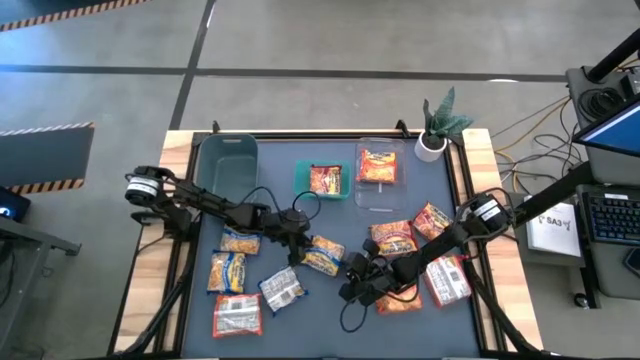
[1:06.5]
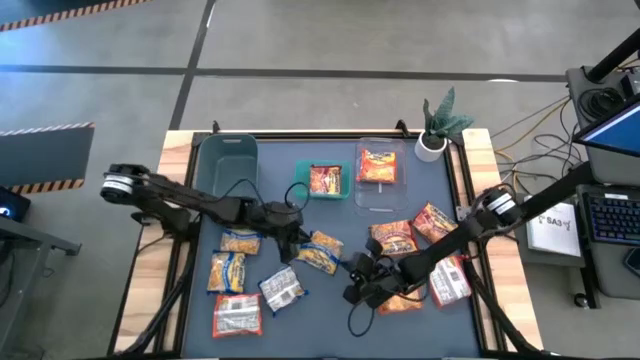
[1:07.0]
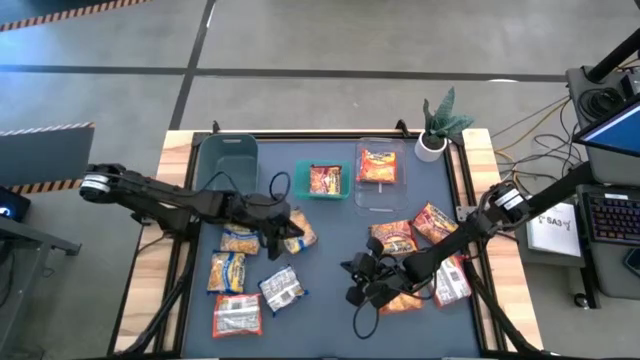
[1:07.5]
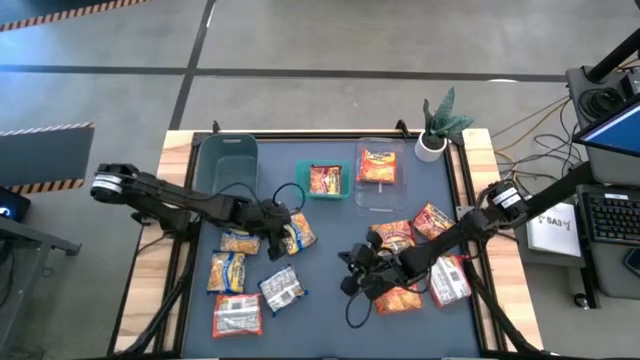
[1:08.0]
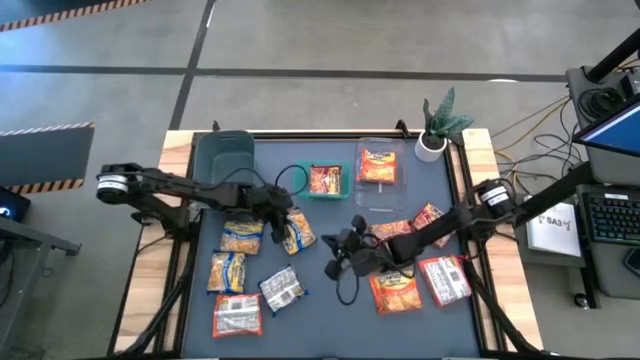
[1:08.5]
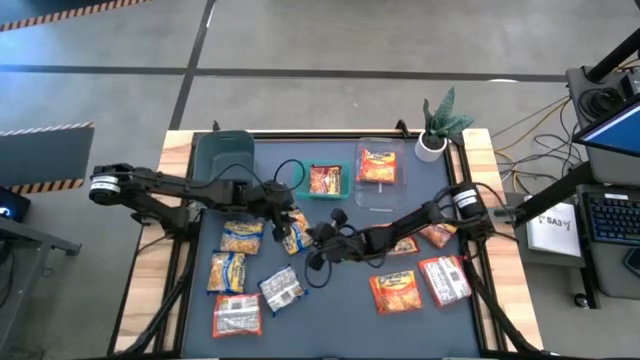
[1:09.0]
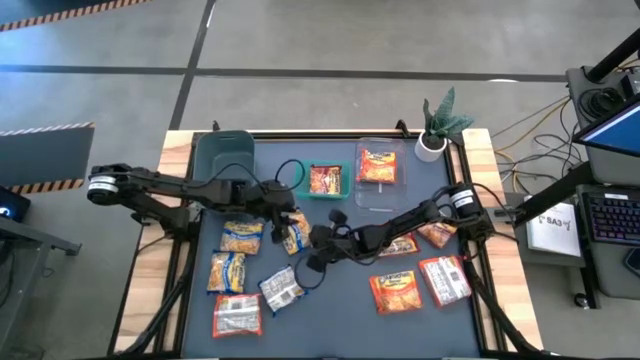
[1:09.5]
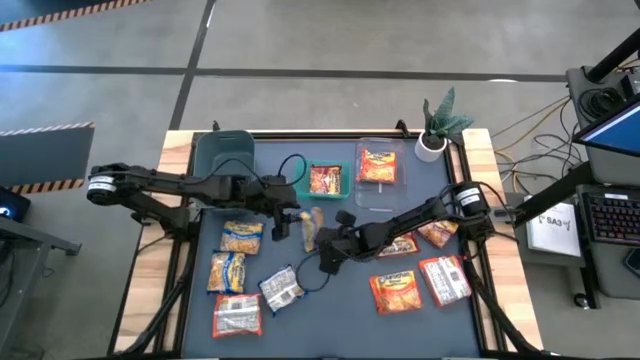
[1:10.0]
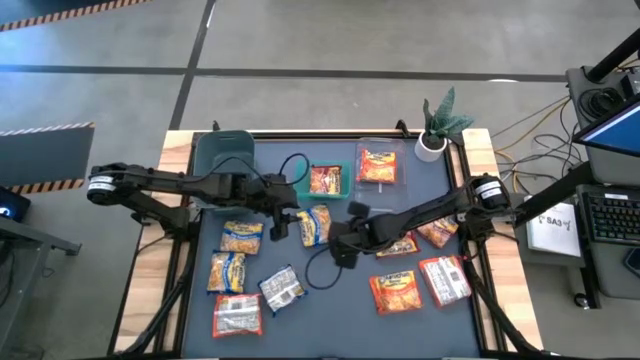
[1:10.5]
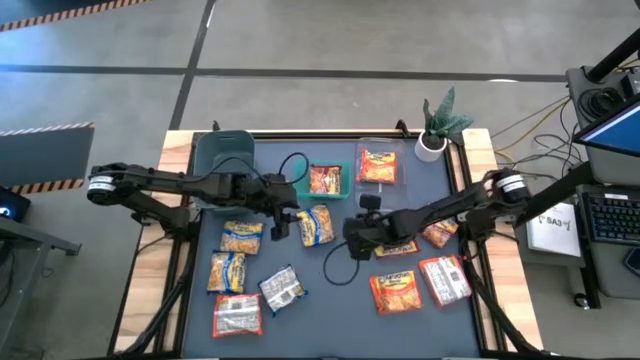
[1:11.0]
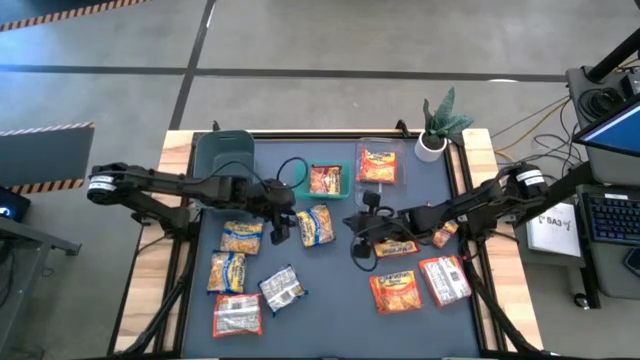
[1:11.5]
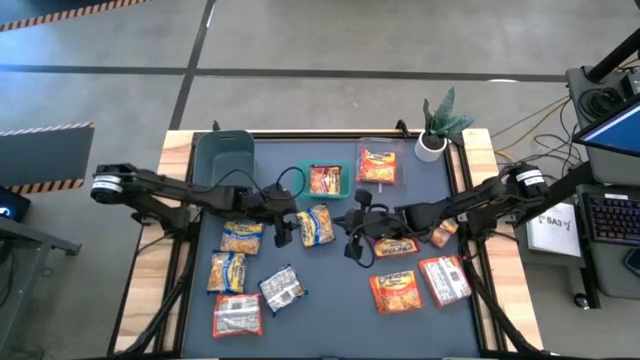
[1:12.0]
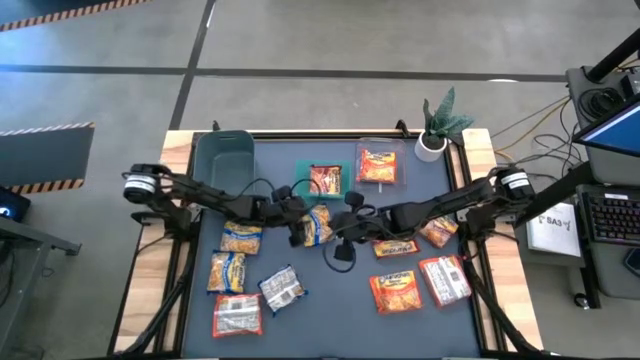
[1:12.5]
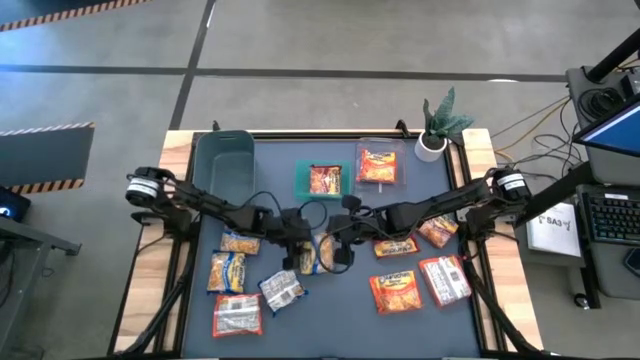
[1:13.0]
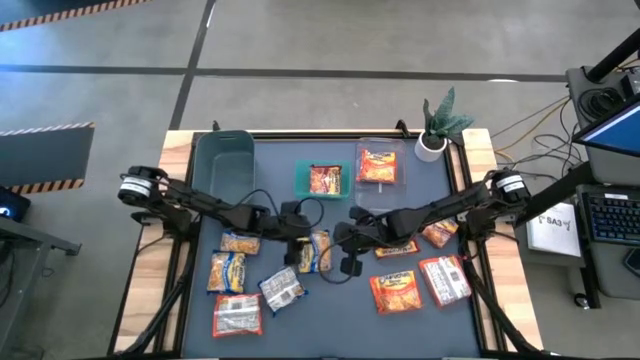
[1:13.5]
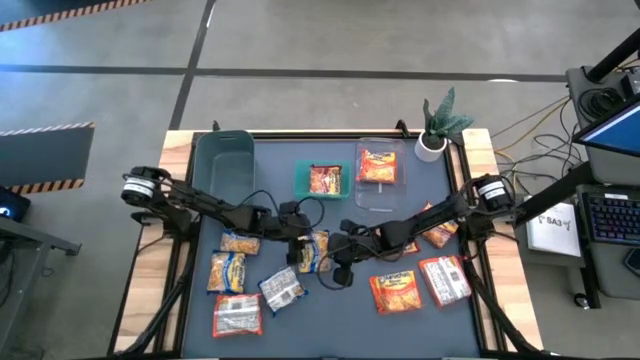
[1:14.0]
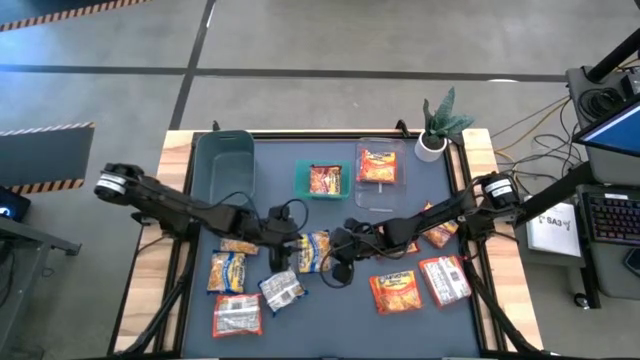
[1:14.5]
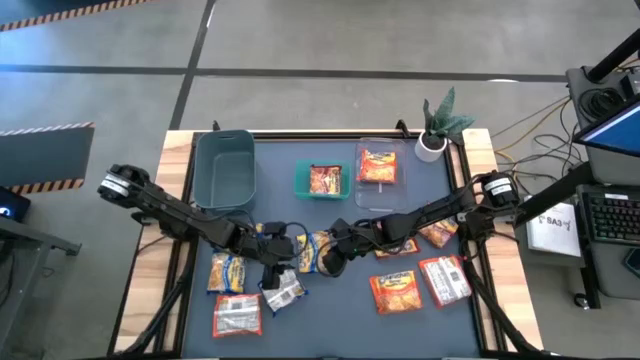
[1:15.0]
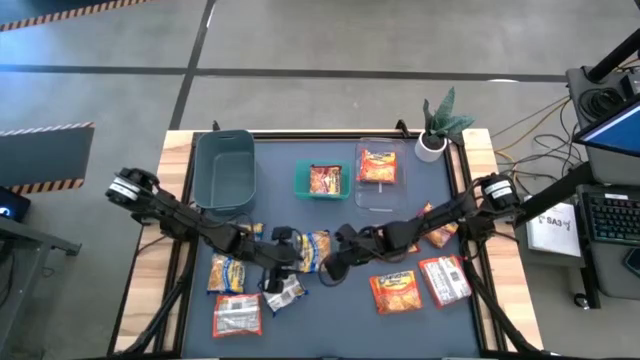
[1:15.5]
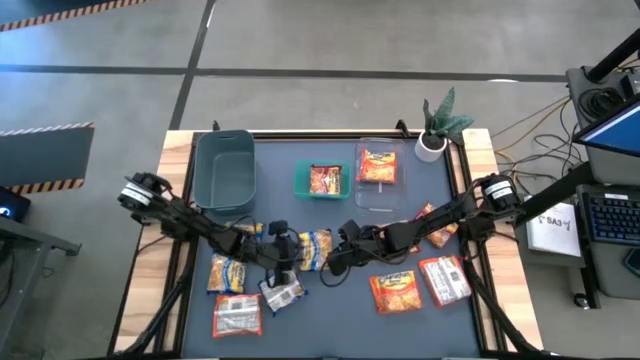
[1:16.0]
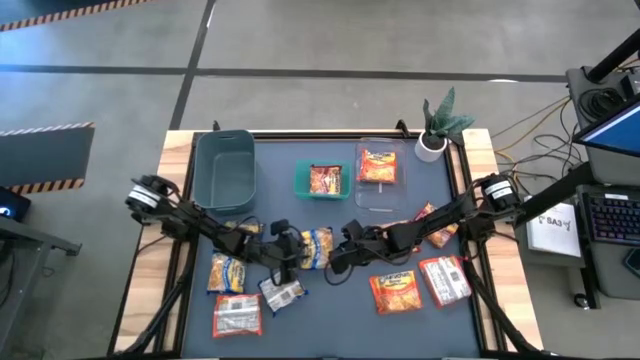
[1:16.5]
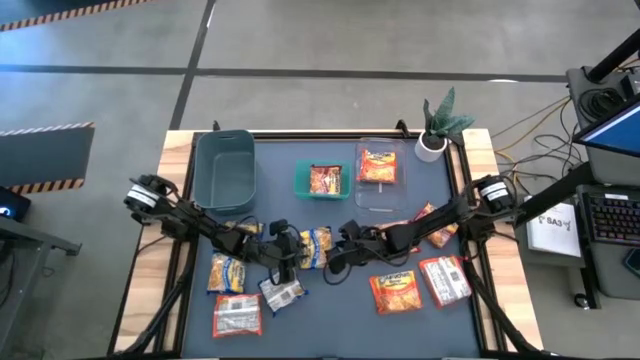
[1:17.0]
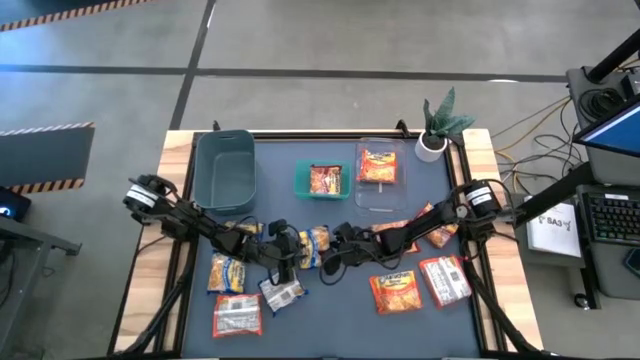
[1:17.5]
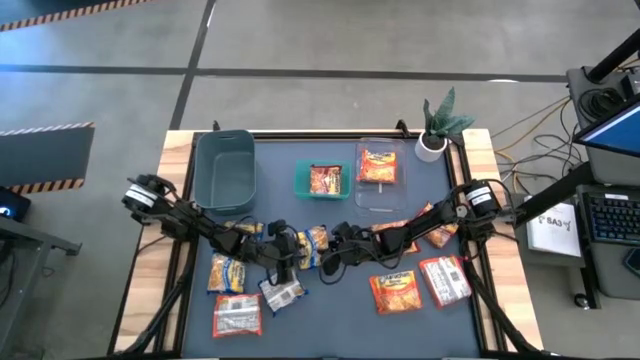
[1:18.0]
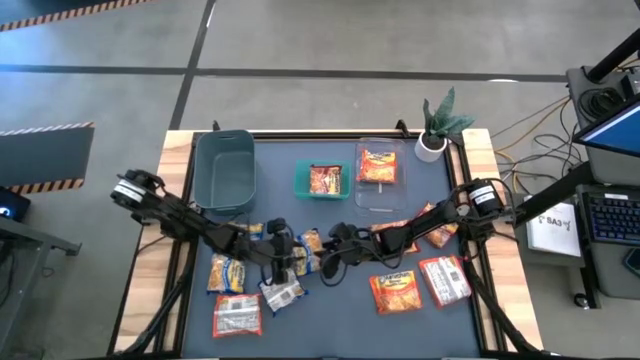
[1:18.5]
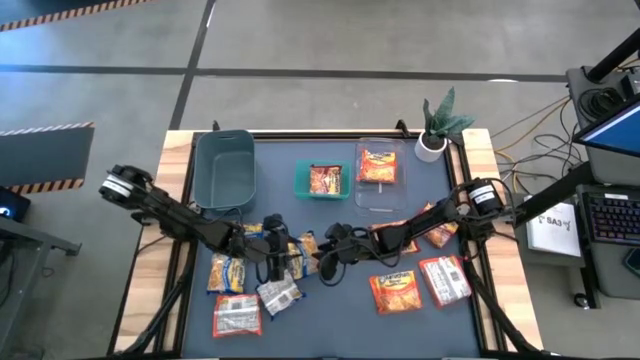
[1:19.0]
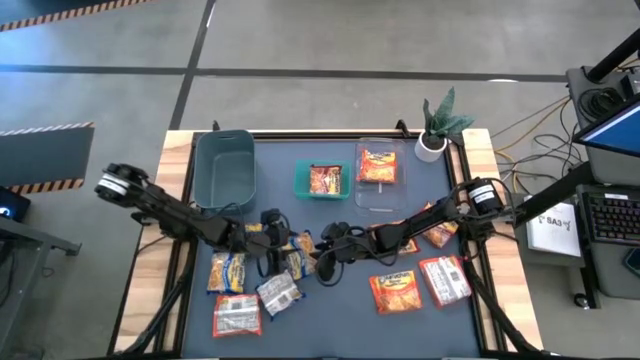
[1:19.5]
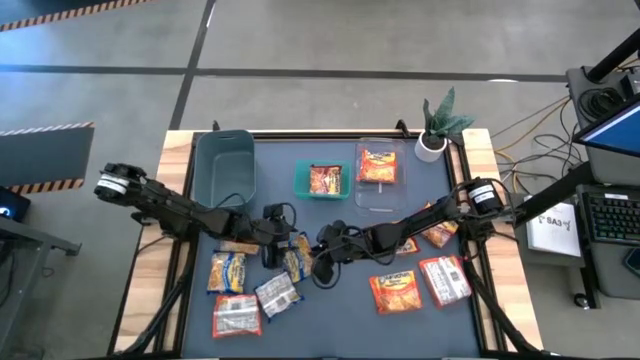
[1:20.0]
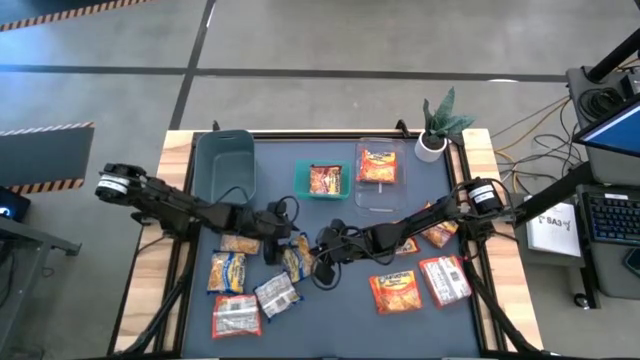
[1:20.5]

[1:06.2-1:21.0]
Task: Sort Maruchan noodles
Put the blue noodle pack into the dark blue bin

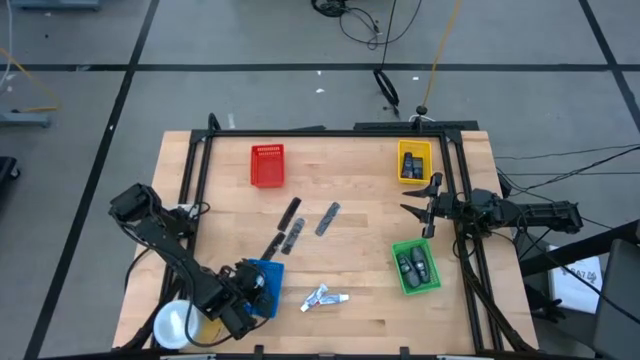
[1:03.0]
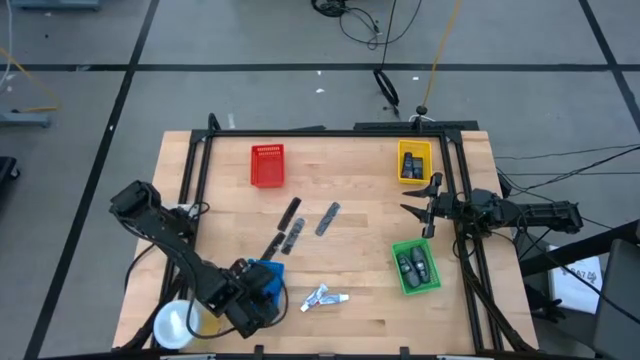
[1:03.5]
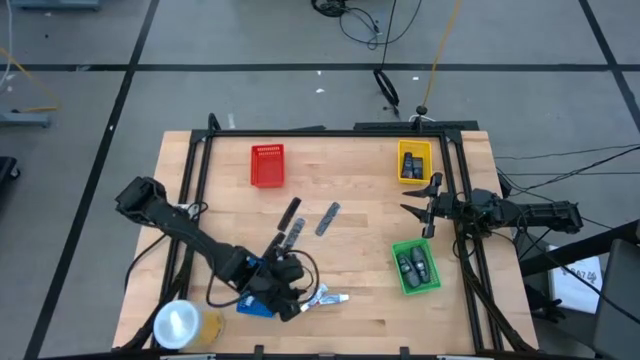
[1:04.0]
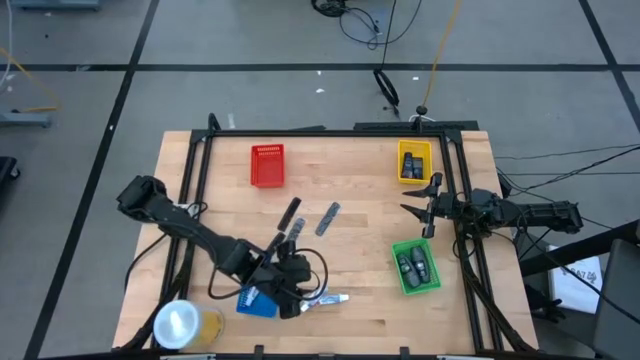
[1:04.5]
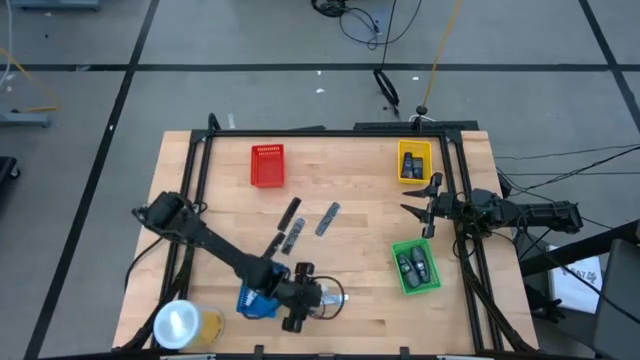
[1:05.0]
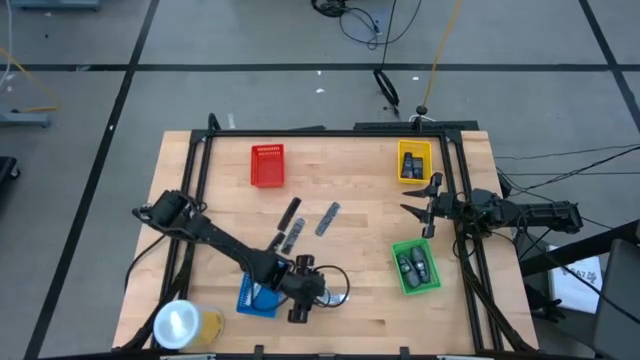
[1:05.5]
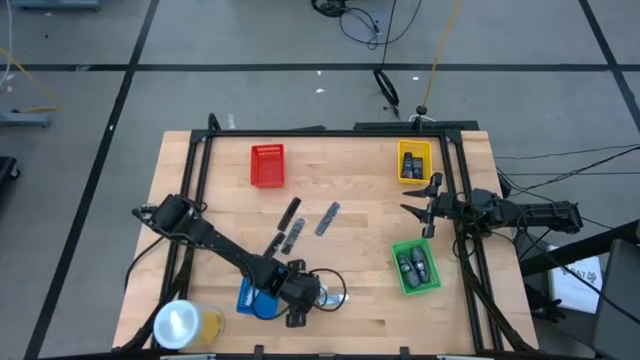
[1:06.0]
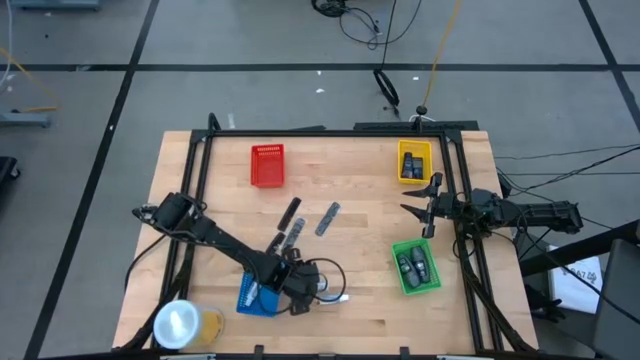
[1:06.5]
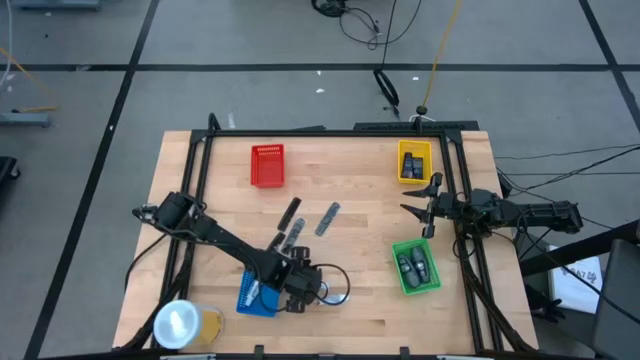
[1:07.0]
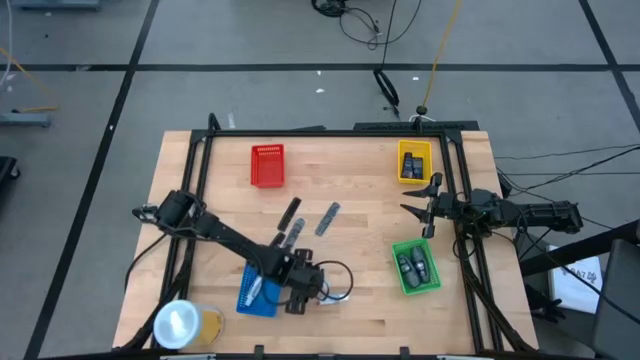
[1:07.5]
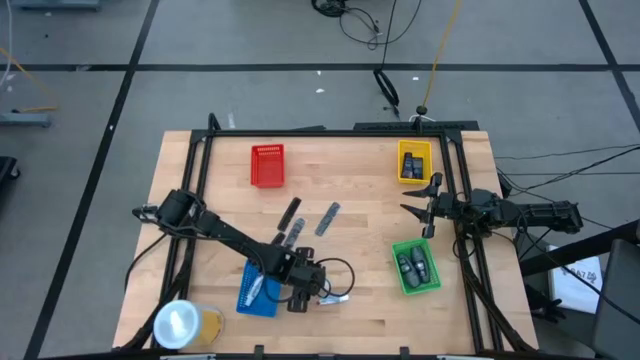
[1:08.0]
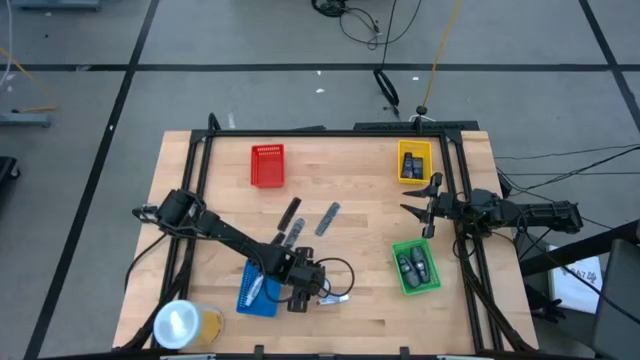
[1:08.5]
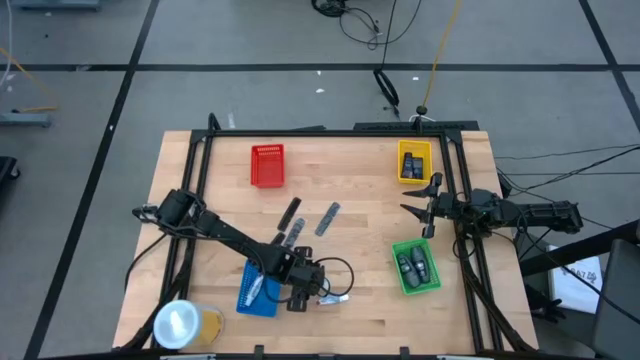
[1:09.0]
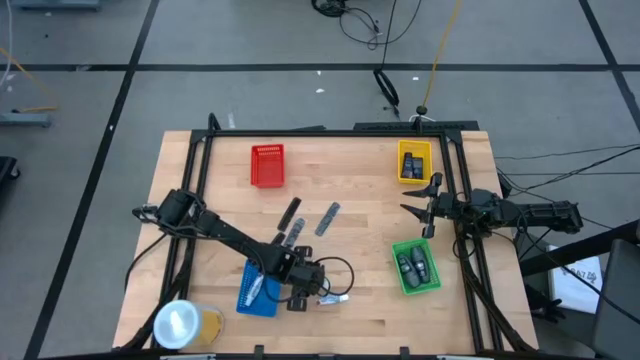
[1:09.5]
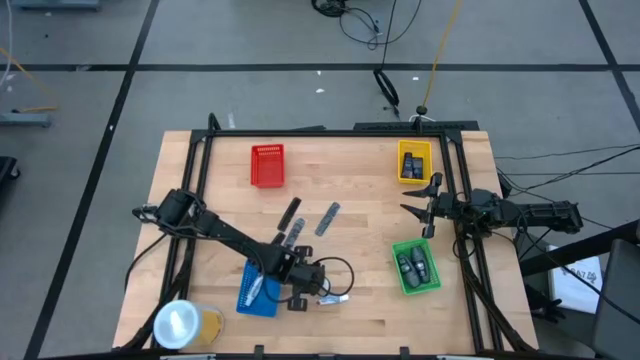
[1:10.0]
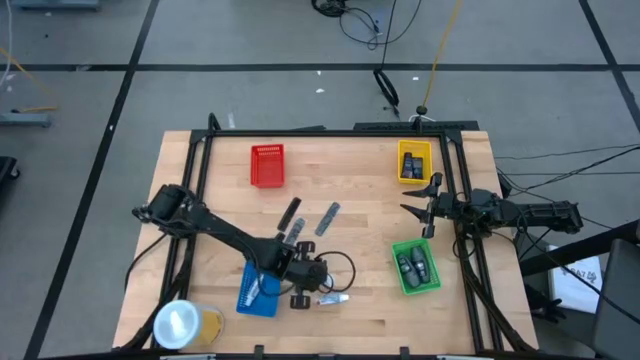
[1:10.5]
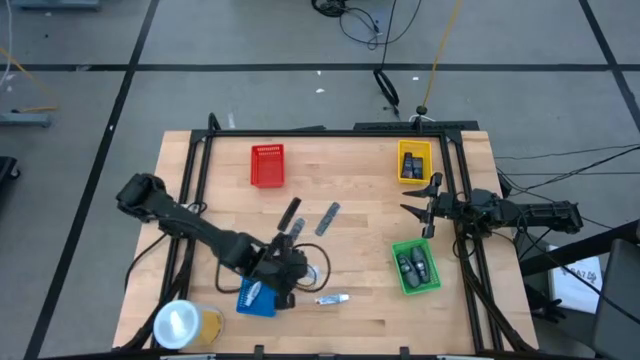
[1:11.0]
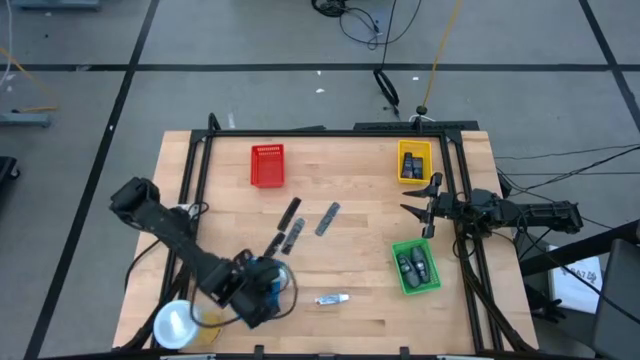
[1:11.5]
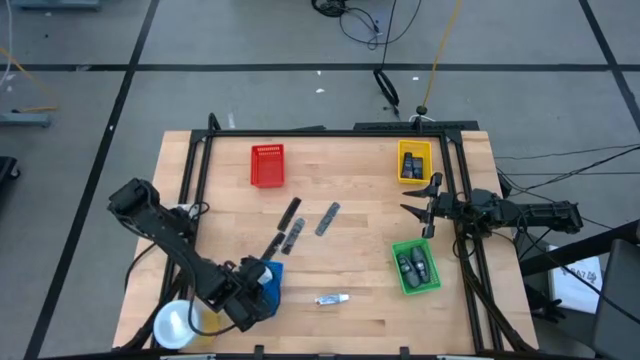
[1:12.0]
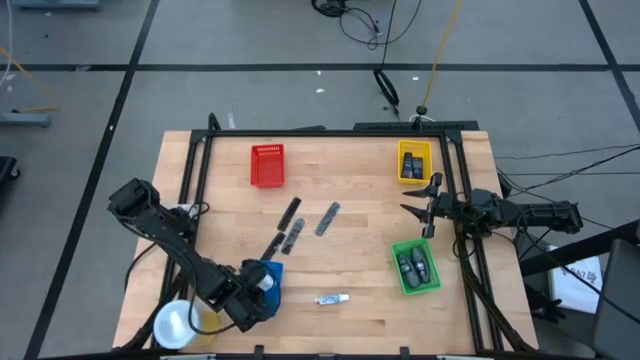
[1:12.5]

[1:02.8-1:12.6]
Task: Pick & Place Travel size toiletries
Put the left white purple toothpaste into the blue basket
